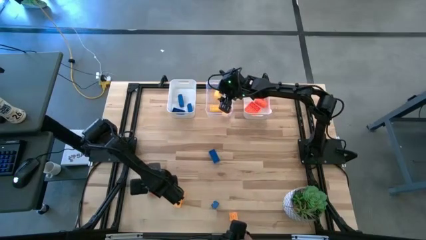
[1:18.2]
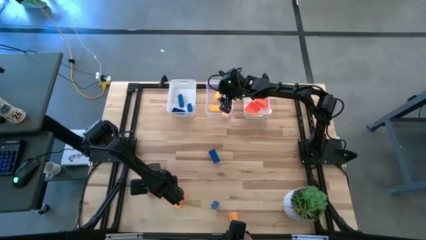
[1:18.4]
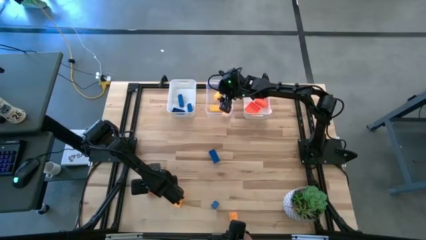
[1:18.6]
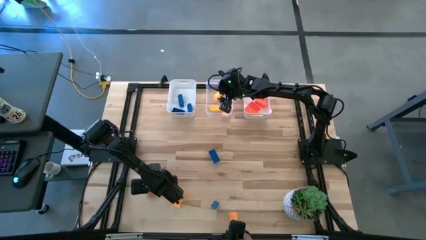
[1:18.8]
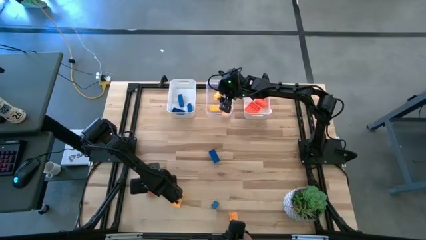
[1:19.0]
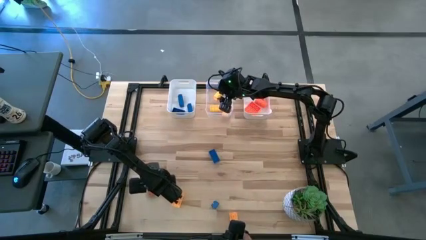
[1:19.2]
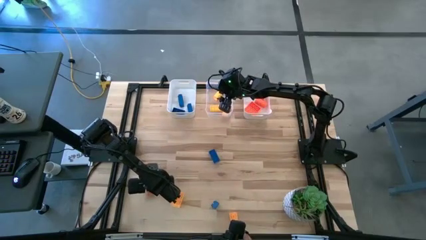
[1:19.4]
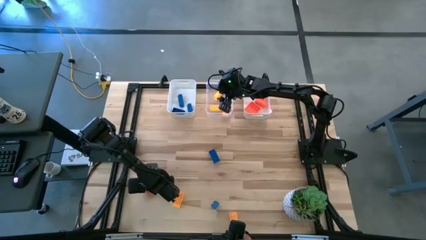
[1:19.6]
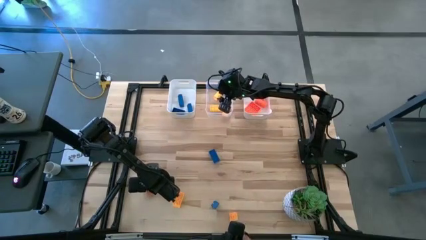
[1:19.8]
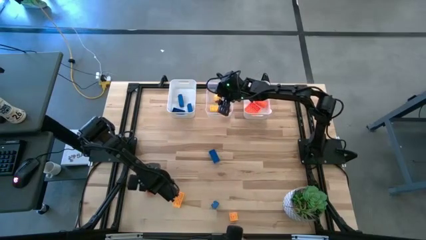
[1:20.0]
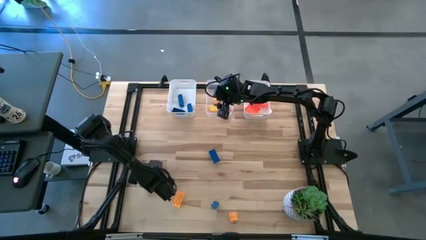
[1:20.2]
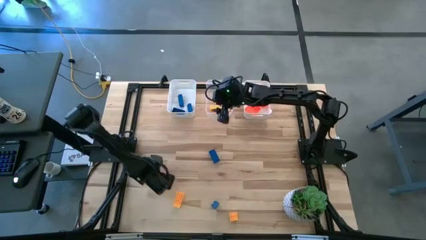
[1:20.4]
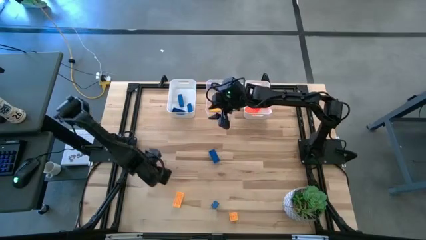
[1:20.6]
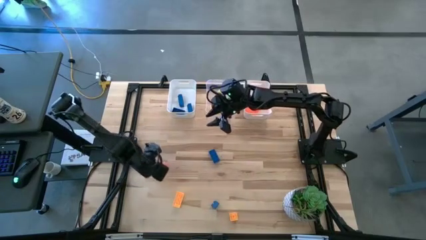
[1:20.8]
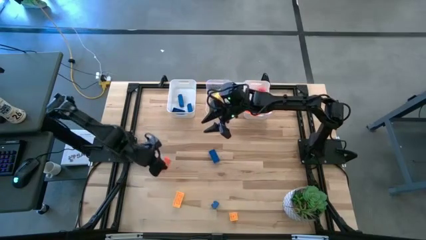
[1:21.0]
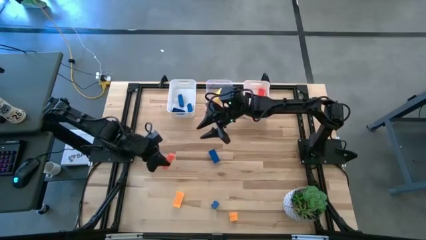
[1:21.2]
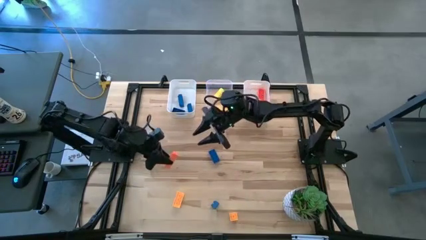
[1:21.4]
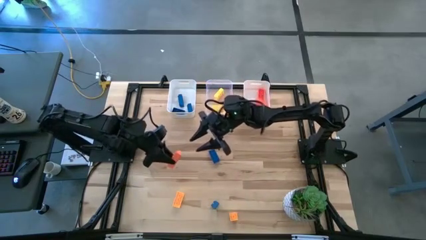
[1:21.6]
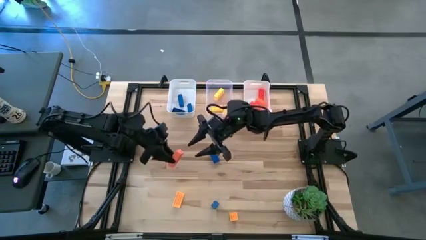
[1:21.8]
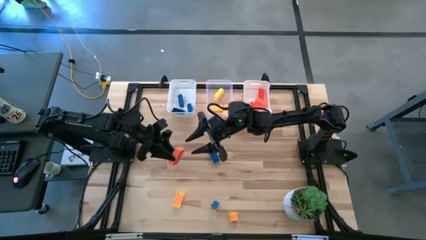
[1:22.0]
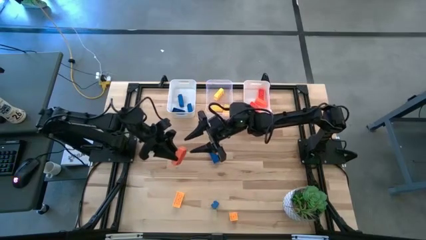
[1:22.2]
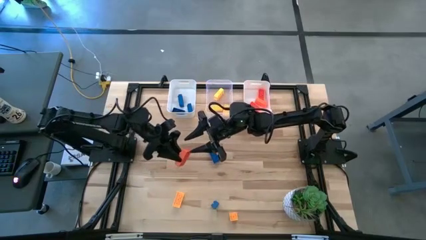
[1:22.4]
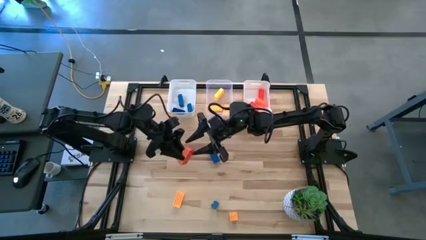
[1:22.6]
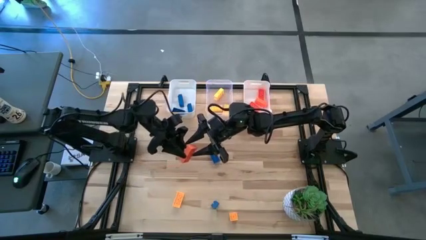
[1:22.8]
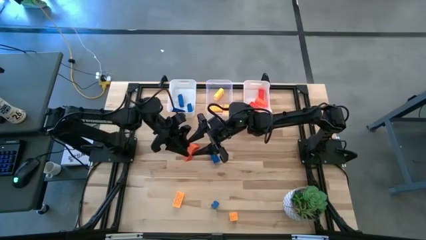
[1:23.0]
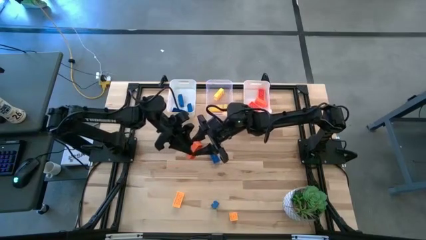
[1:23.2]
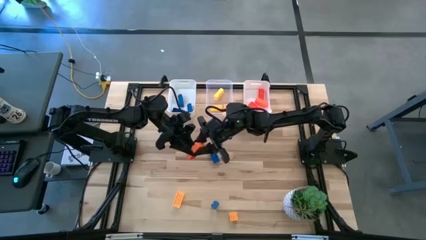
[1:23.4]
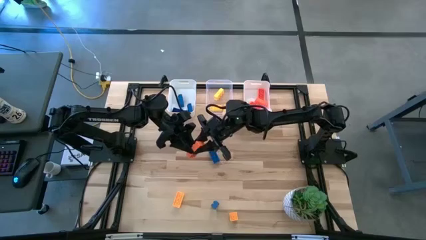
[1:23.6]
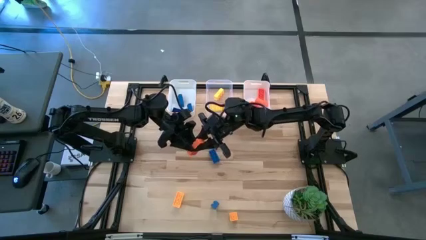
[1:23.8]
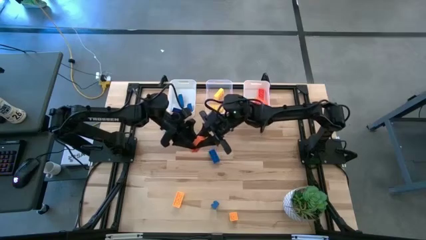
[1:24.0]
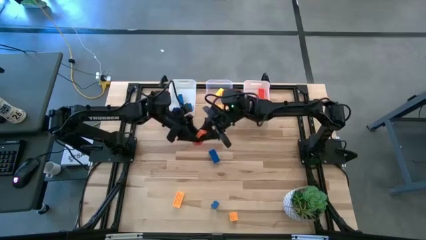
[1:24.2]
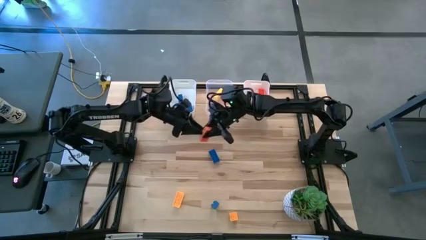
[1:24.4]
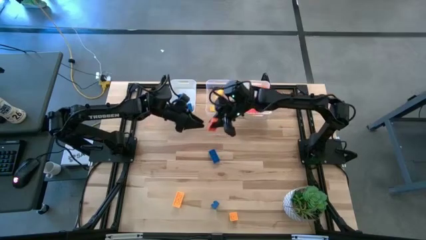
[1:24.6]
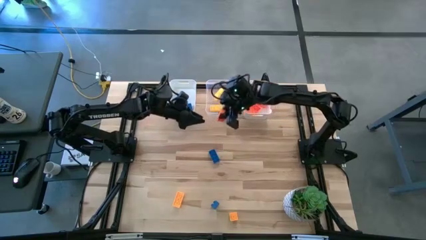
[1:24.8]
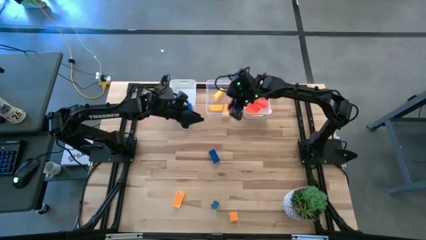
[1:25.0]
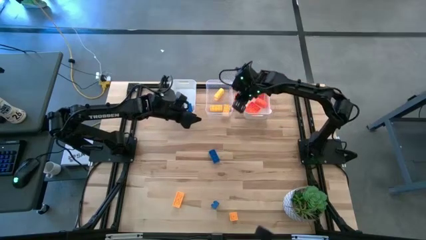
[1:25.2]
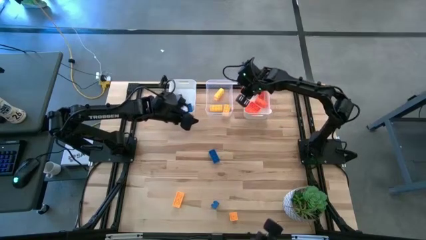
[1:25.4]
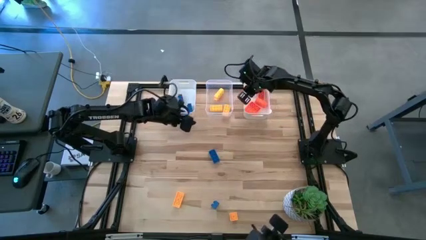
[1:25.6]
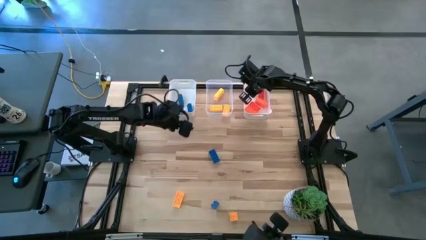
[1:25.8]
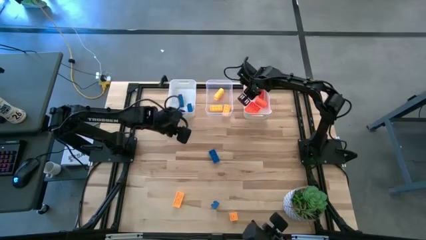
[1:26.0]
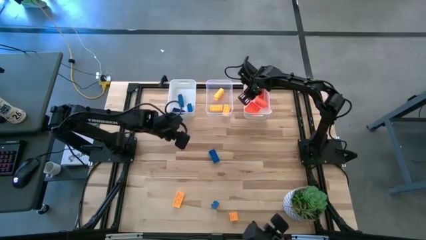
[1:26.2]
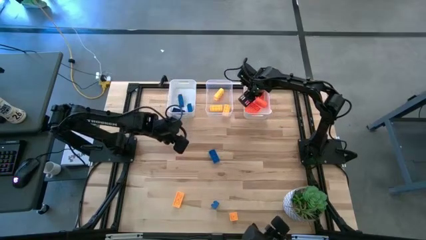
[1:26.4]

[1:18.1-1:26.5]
Task: Sort & place blocks by color
Put the orange block into the right white bin

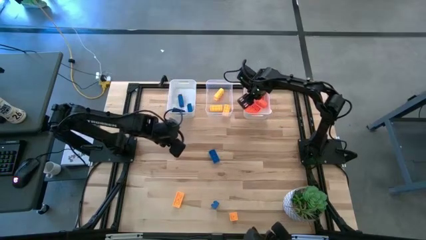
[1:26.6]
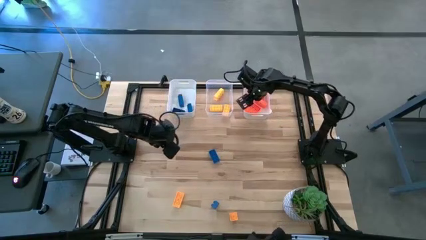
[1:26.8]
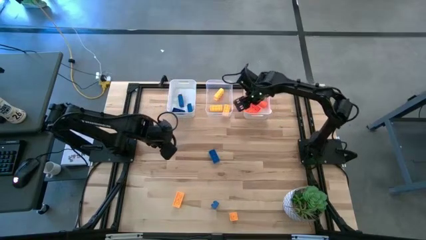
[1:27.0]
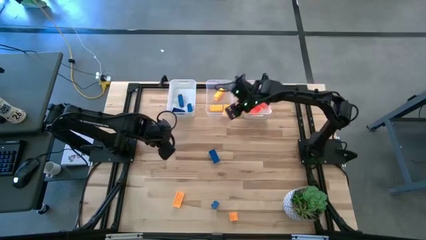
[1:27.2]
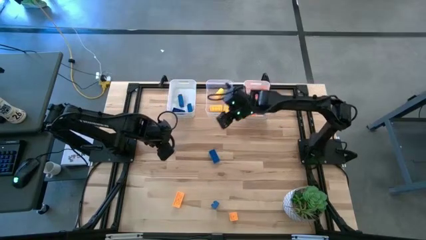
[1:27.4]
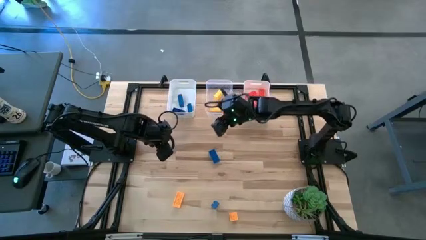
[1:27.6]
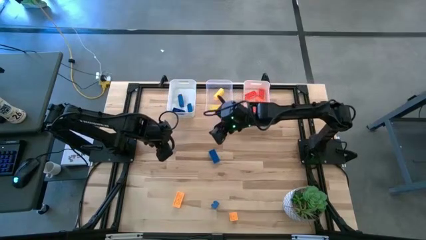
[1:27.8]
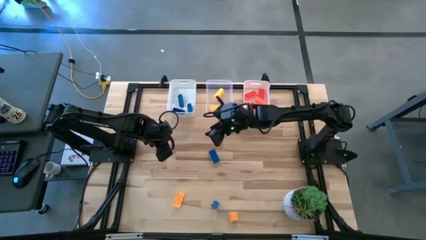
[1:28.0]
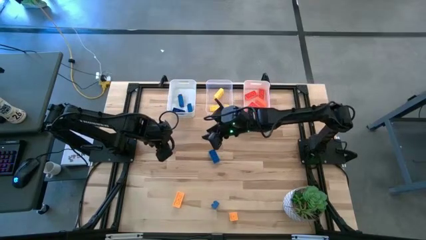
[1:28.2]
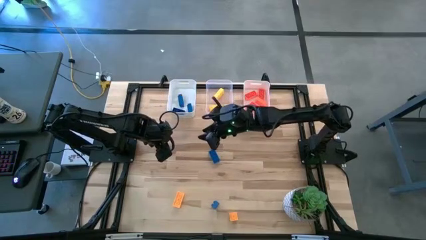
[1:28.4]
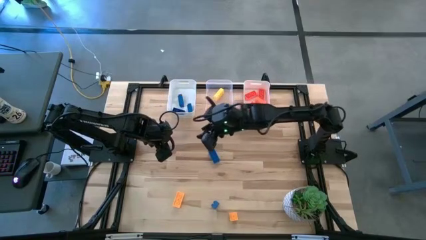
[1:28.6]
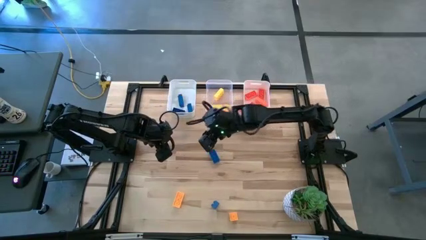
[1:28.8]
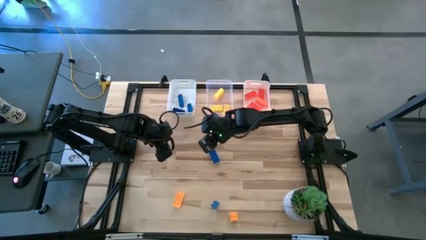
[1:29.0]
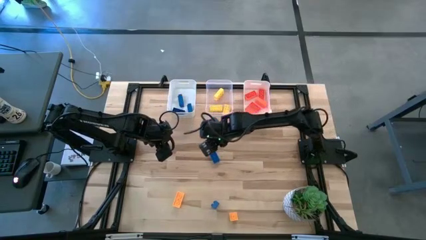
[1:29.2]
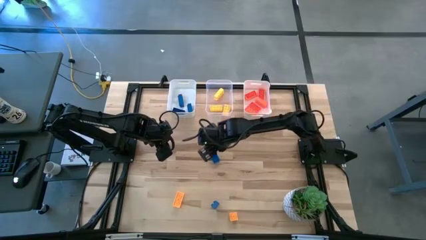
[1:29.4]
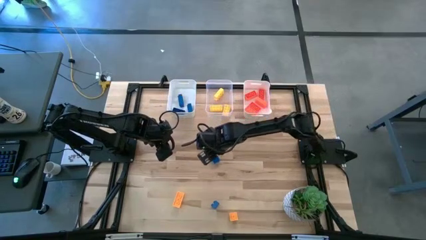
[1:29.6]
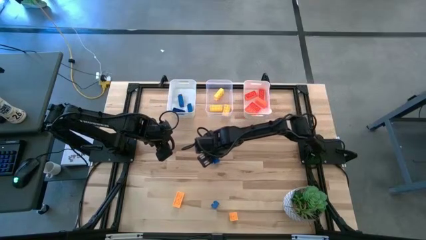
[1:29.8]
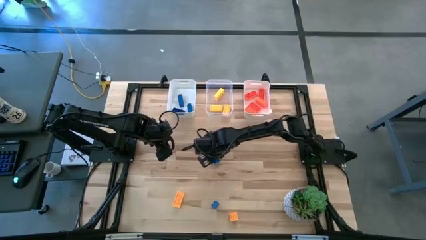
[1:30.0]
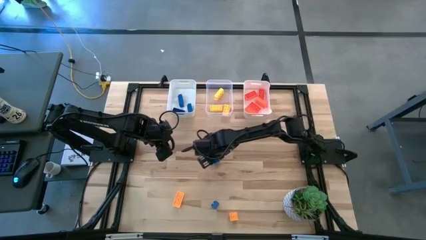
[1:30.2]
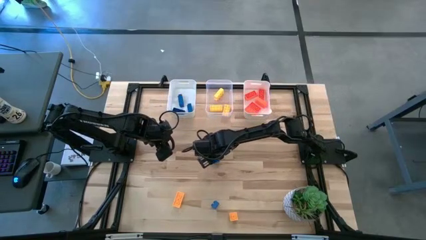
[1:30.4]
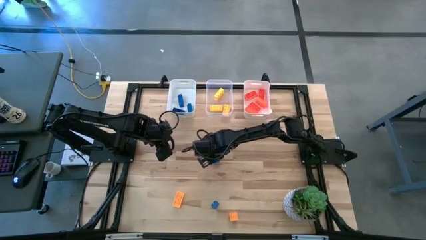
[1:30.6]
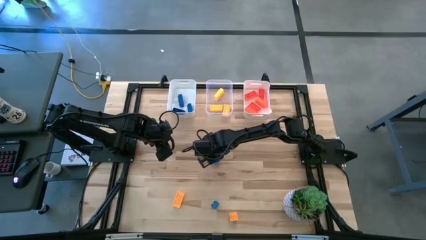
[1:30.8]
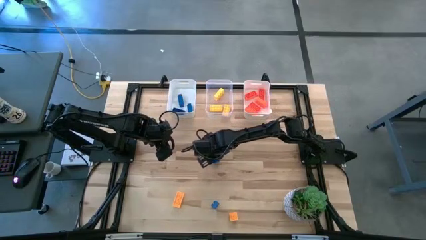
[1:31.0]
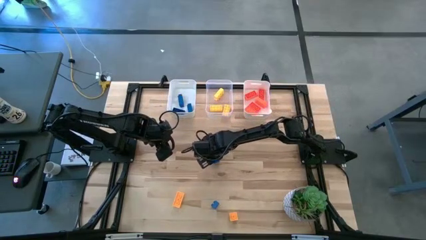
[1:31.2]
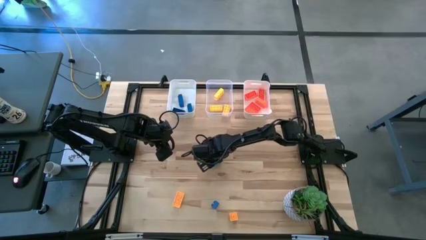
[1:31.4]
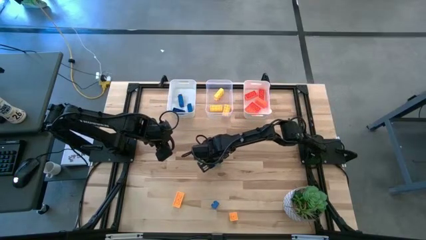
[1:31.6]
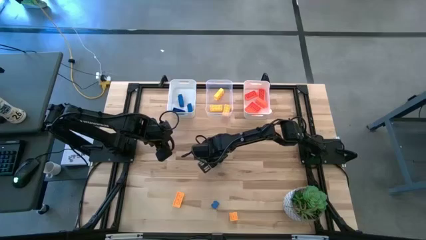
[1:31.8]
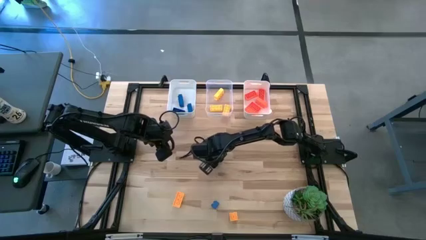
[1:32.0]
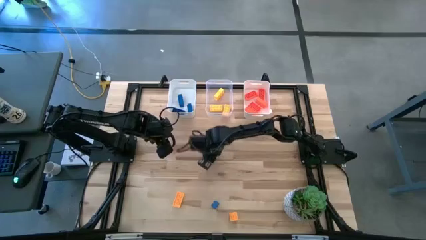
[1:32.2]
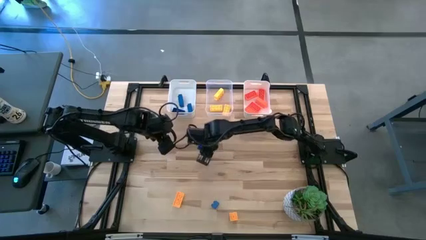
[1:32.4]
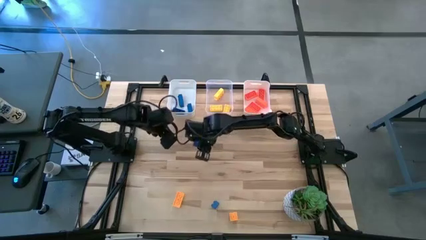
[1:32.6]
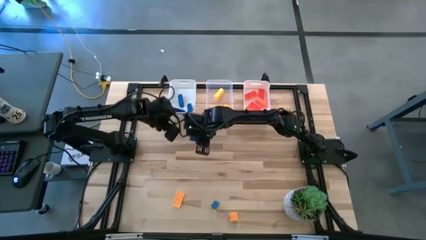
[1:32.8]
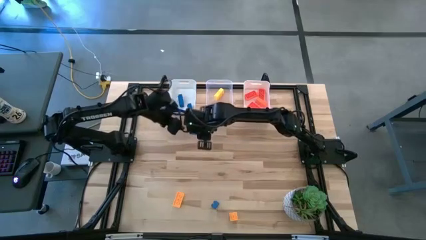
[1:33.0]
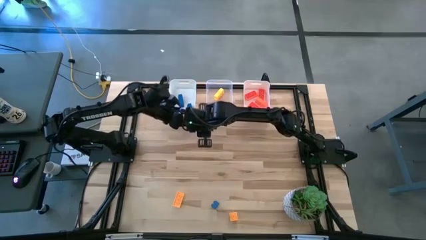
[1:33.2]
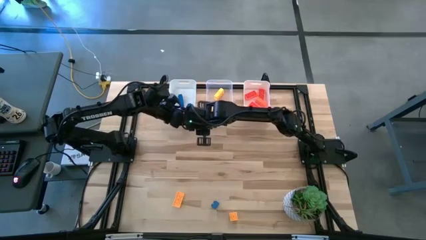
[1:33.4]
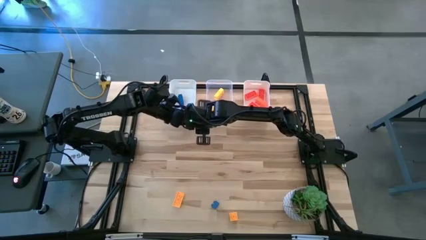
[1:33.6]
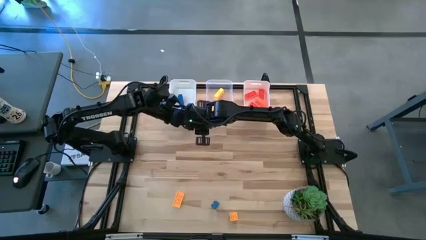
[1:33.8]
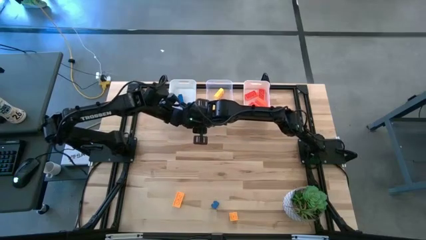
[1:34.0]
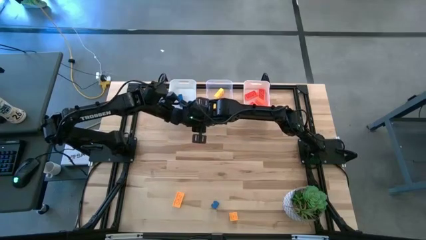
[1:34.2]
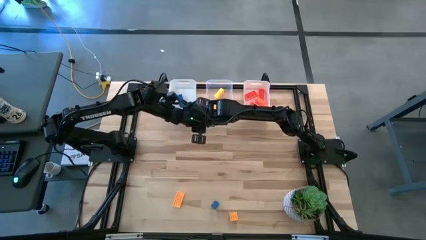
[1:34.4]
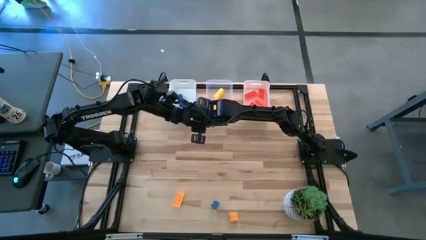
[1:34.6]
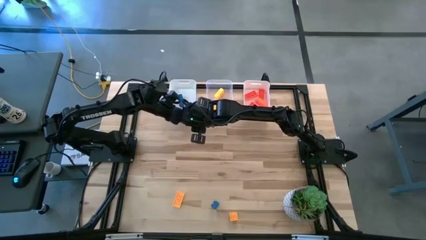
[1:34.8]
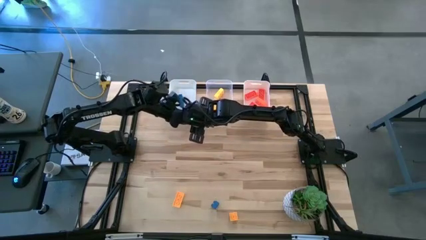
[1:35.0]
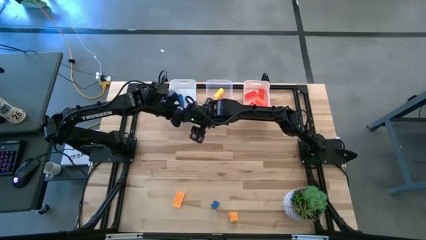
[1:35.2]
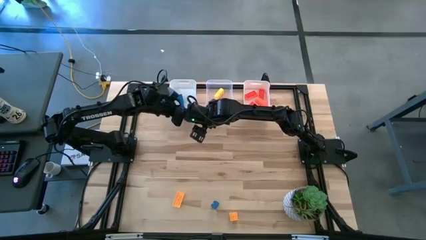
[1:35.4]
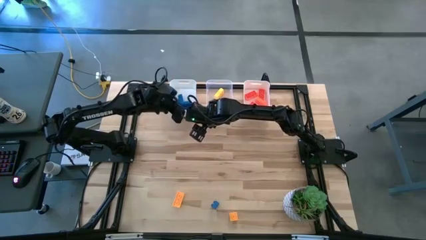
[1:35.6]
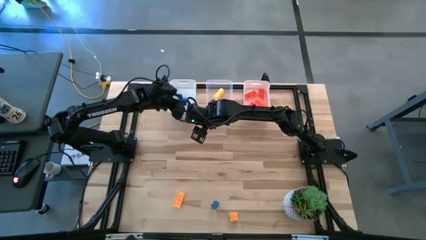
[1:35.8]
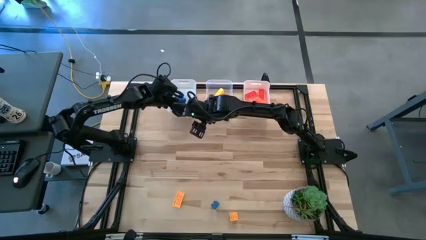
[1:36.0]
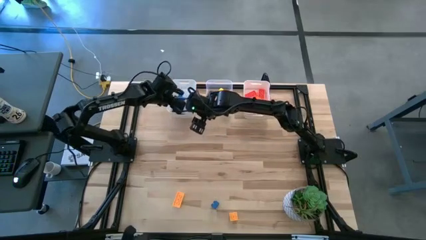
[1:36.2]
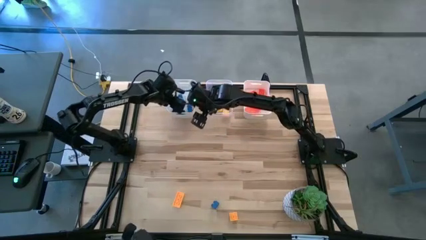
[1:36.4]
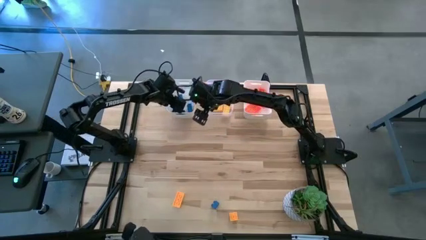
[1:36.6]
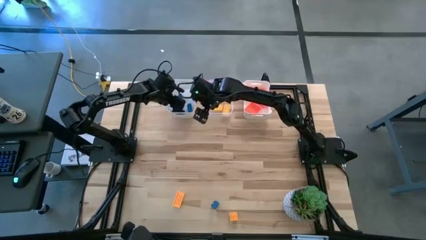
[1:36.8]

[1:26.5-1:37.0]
Put the blue game piece into the left white bin
